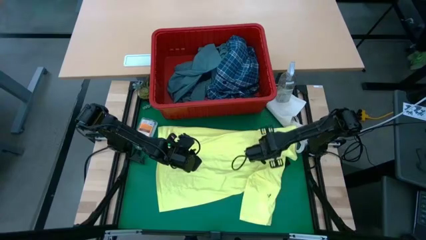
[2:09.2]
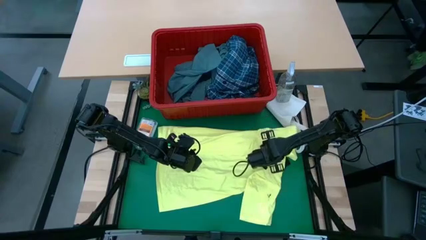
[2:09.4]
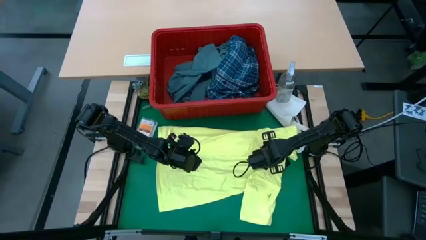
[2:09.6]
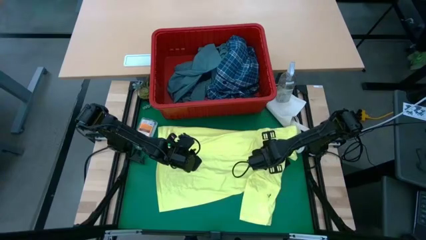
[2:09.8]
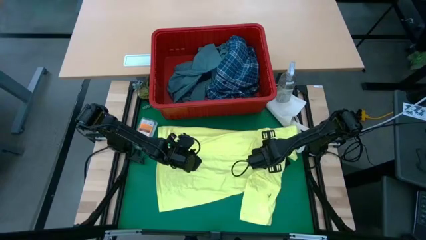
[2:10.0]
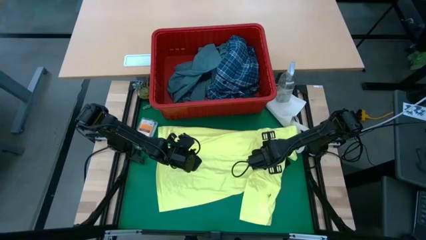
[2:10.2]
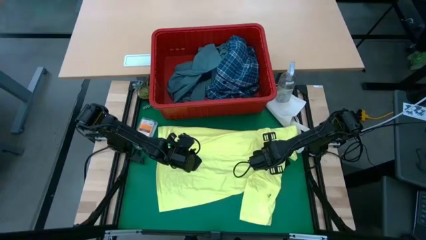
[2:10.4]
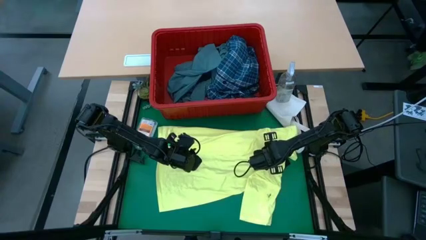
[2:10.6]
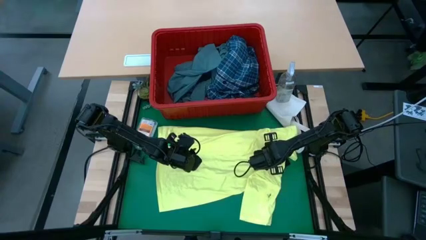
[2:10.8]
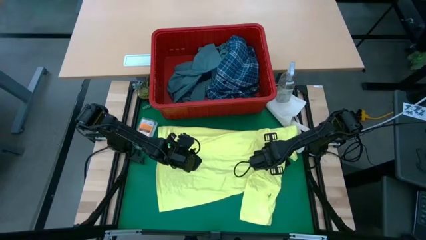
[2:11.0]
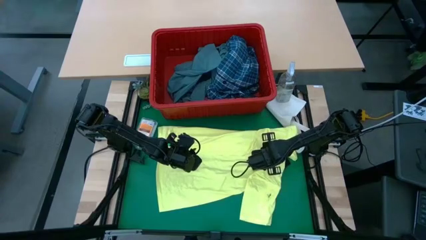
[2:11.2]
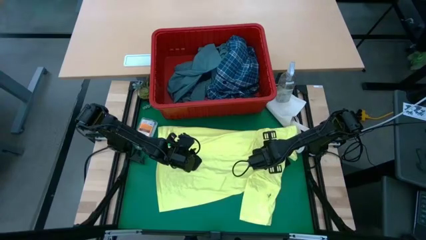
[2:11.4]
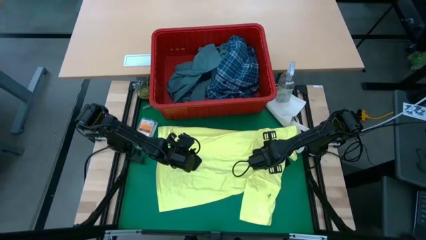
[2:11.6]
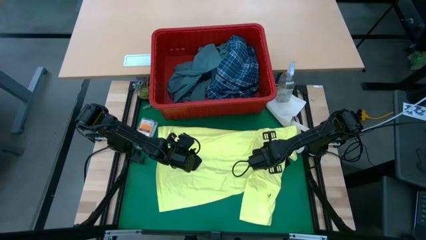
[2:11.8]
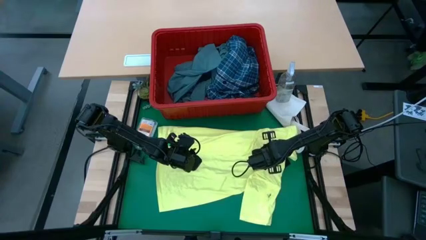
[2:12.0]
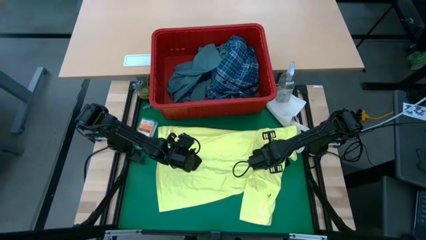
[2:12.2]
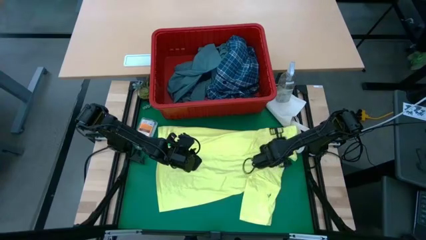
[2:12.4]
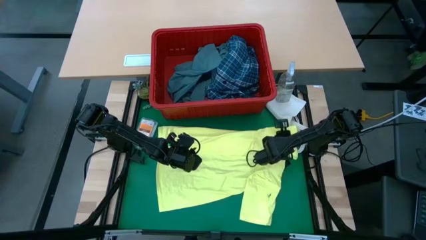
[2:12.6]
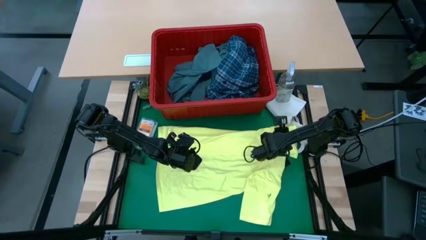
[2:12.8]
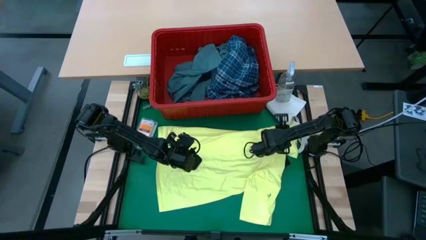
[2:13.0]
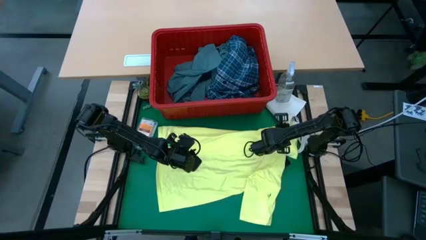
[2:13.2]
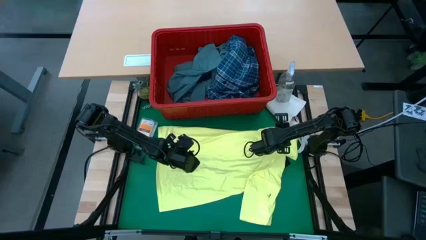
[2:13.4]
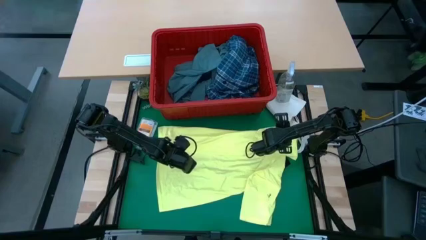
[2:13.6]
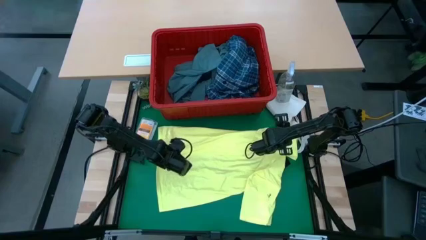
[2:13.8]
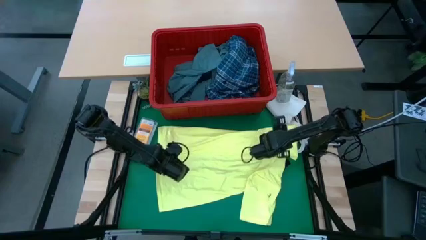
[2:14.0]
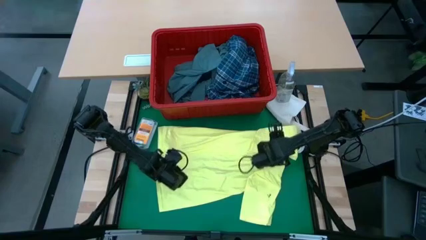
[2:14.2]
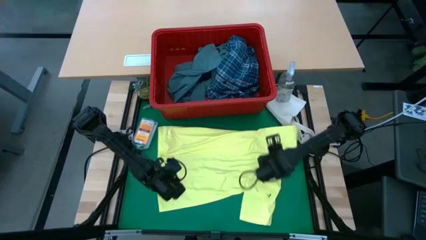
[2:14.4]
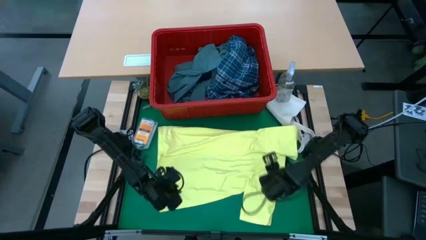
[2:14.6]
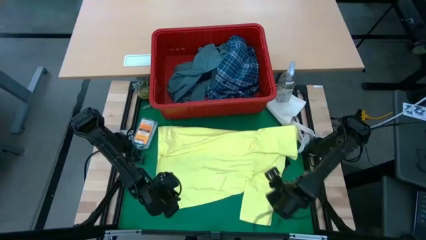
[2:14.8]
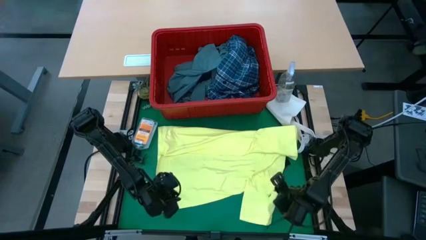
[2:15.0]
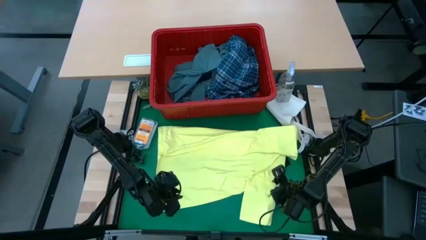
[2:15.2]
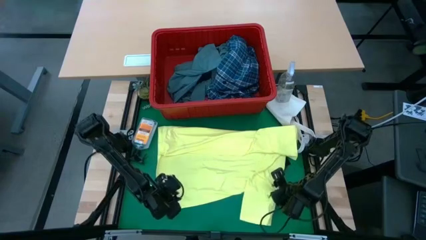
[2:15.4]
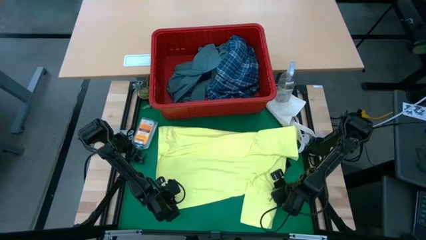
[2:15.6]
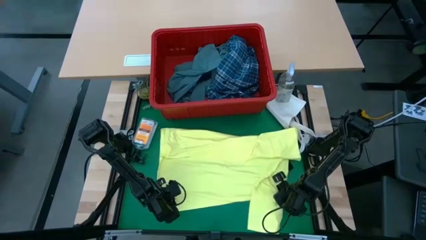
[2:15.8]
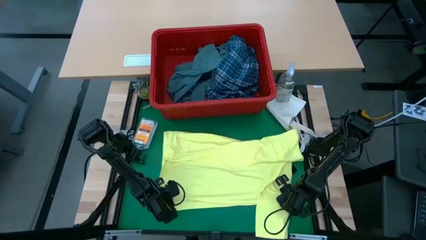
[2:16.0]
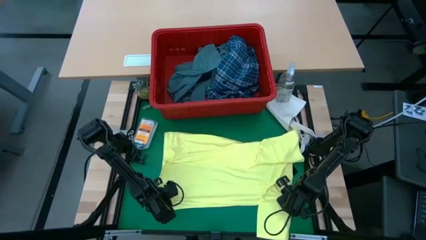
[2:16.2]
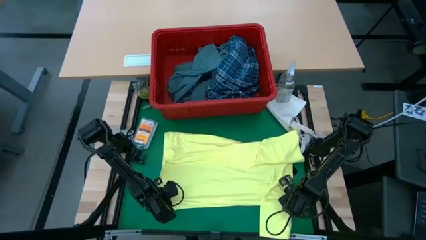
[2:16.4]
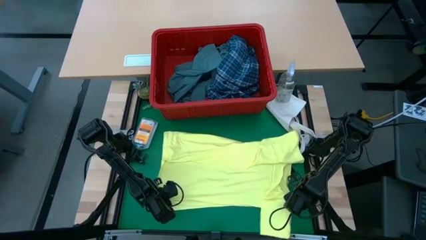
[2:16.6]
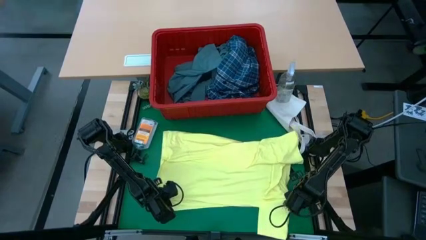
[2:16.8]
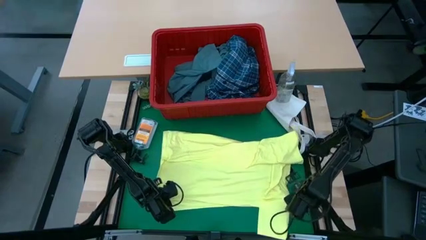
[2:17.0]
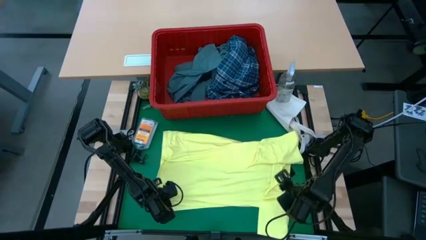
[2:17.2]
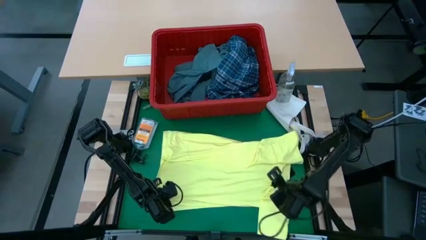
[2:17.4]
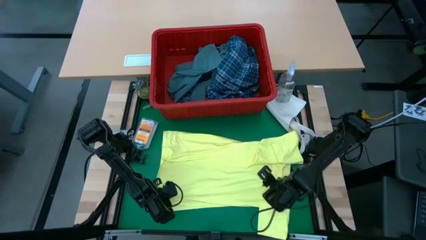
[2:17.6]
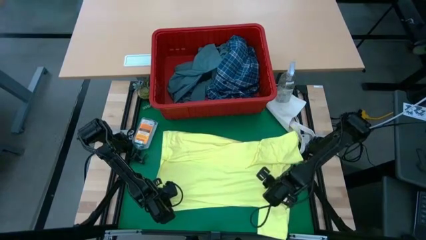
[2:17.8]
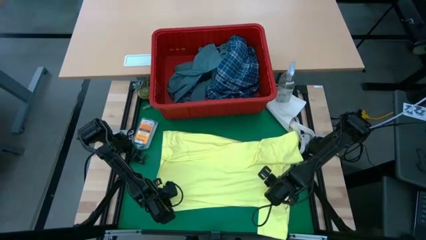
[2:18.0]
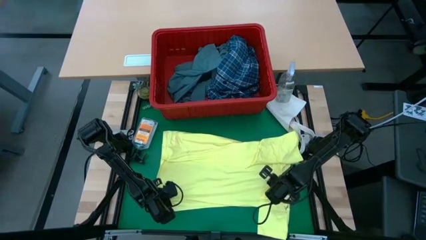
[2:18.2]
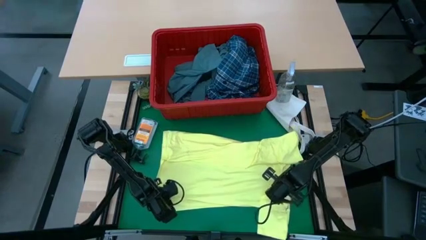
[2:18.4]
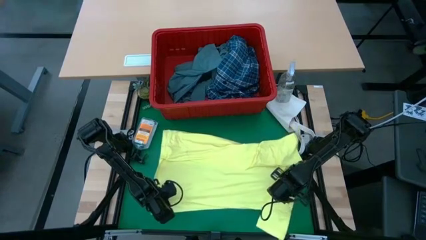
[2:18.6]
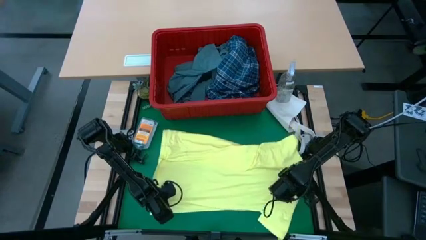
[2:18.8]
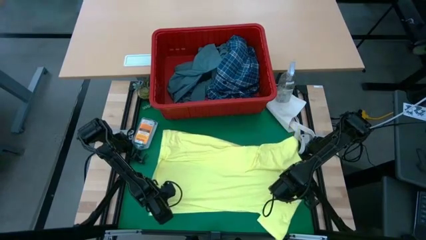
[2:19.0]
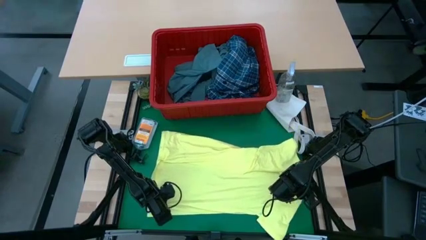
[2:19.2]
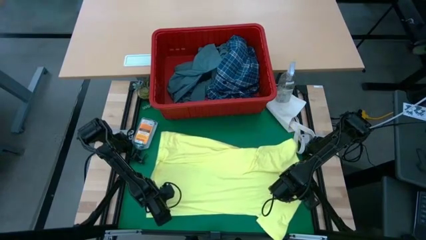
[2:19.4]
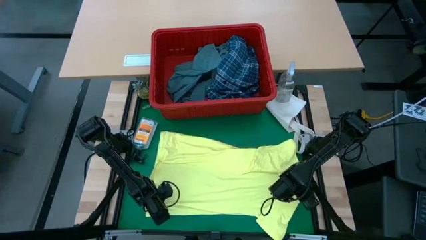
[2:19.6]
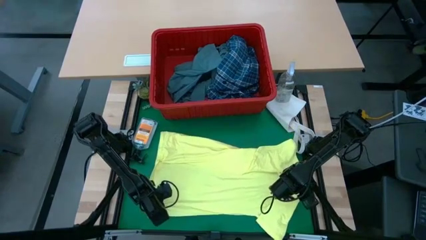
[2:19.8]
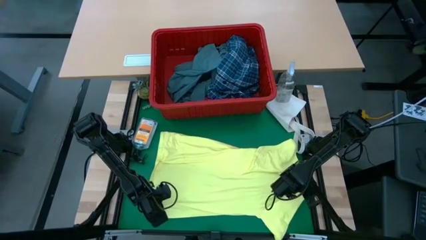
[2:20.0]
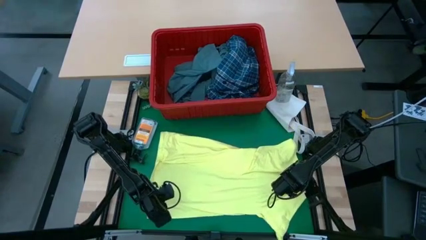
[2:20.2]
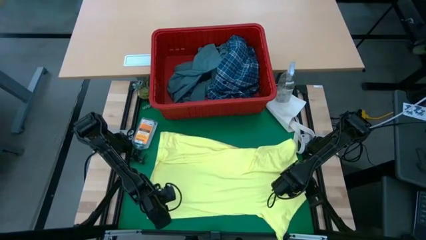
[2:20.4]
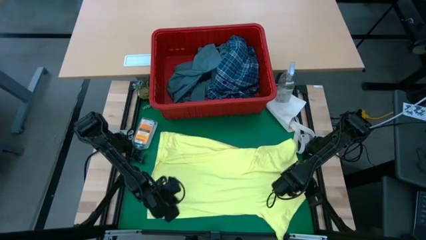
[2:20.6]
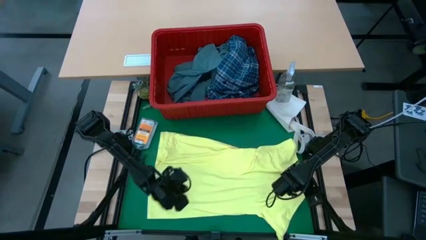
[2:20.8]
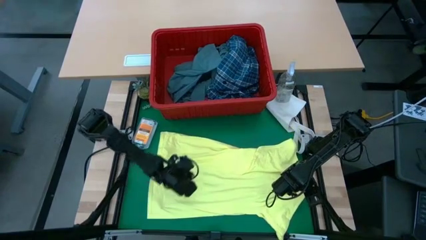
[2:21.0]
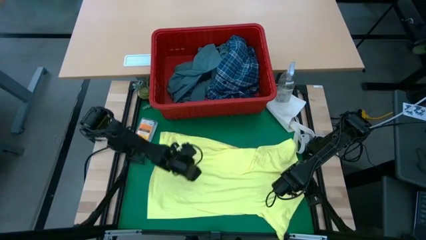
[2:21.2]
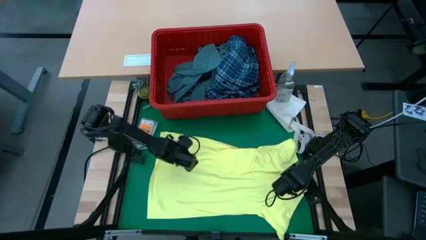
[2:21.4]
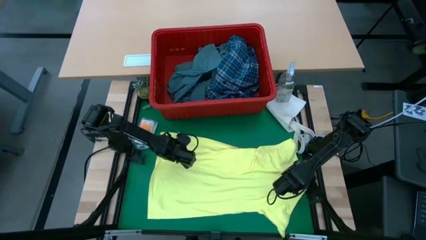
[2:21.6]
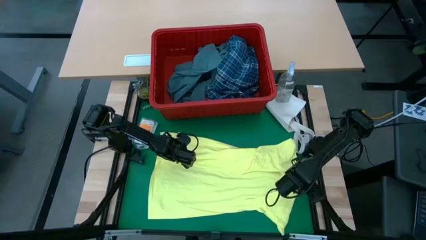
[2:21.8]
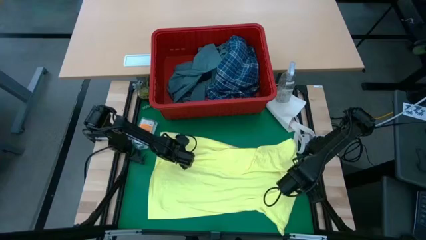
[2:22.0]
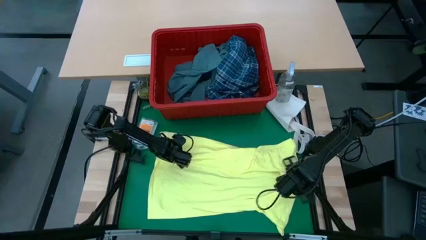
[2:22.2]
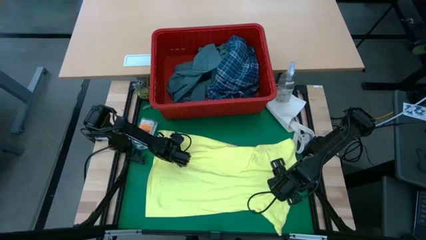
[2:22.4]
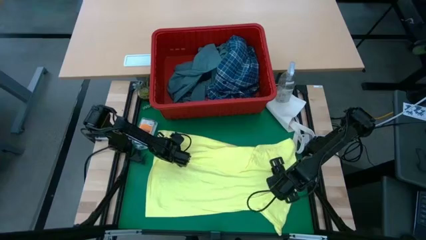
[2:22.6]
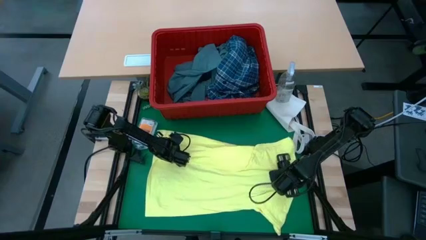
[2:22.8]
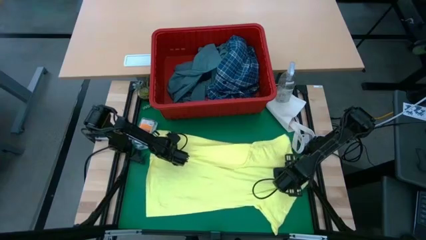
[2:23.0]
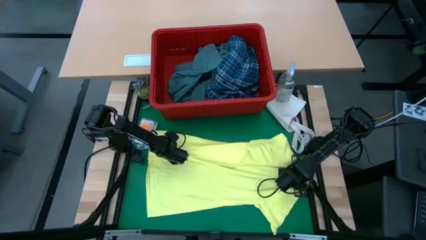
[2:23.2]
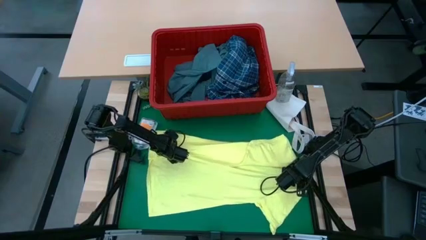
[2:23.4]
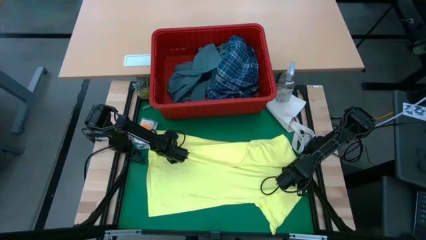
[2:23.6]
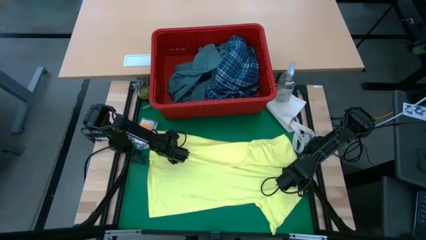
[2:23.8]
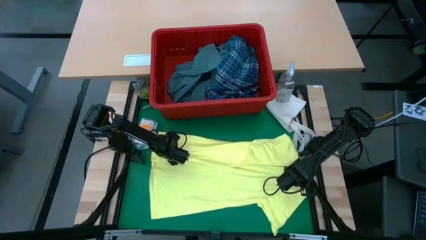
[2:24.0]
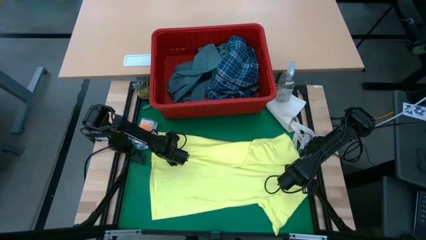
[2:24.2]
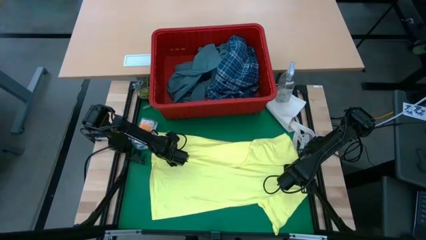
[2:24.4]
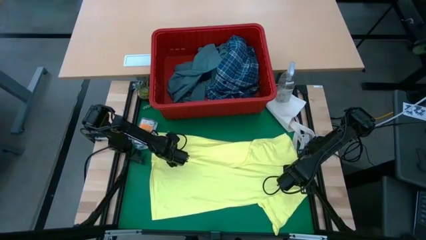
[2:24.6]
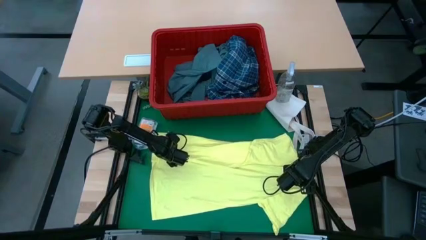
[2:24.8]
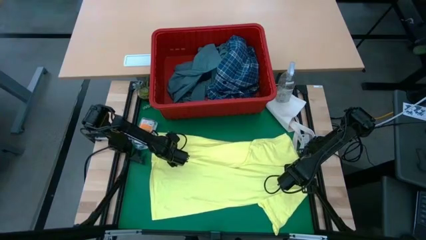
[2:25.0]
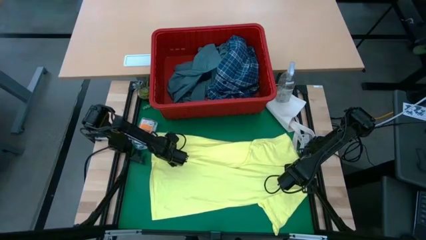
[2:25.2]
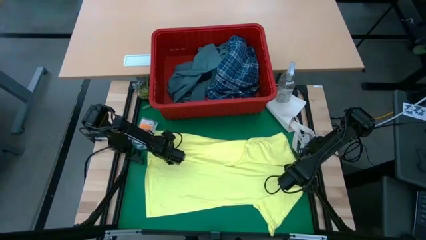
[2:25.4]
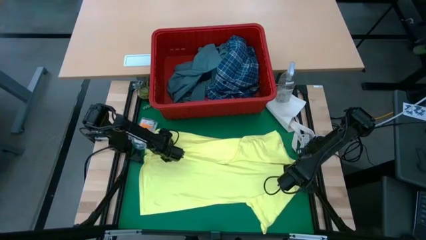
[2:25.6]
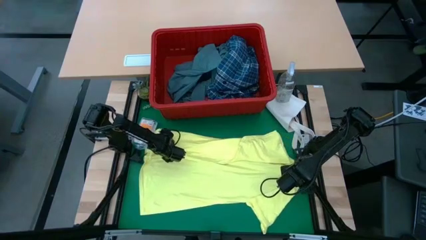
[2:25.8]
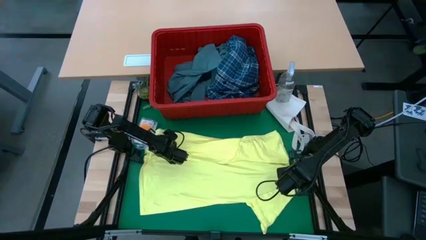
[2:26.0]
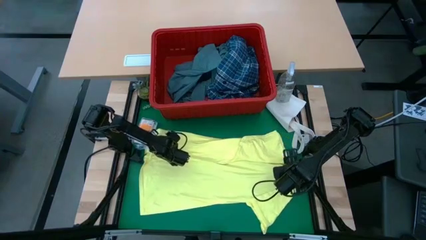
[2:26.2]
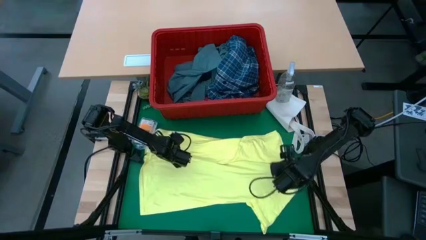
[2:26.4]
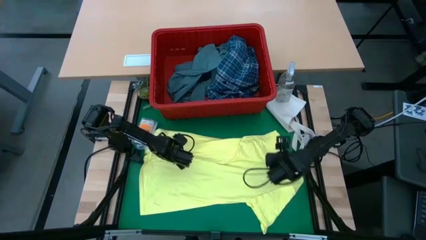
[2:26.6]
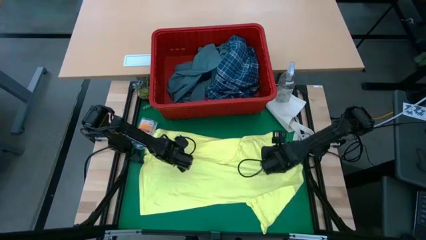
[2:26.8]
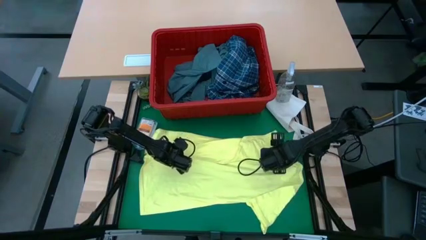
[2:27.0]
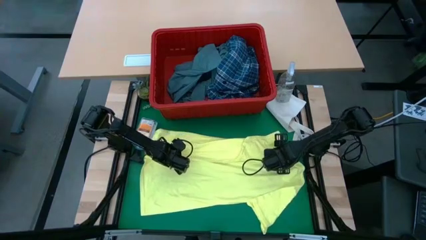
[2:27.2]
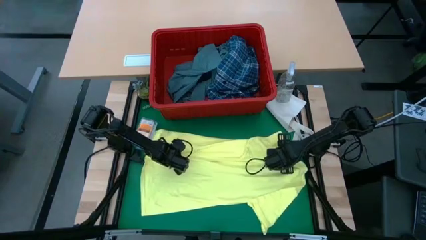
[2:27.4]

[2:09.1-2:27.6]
Task: Fold Laundry from Bin
Fold the yellow shirt
